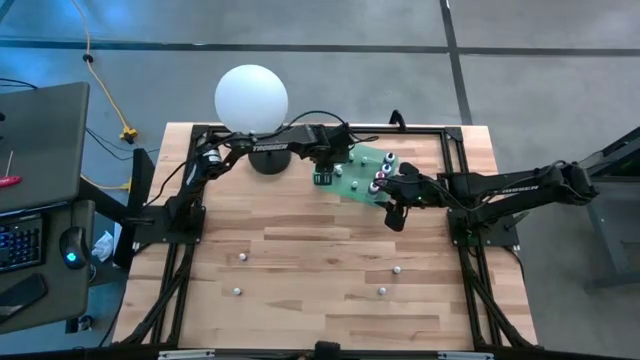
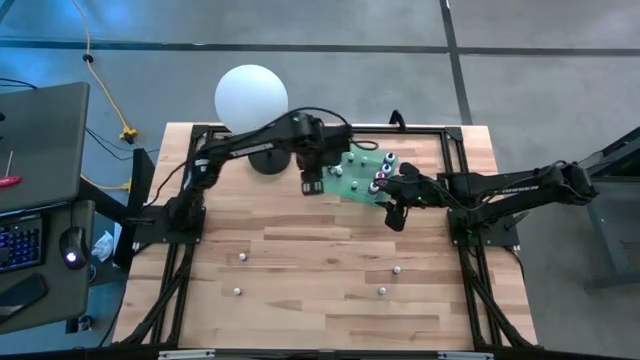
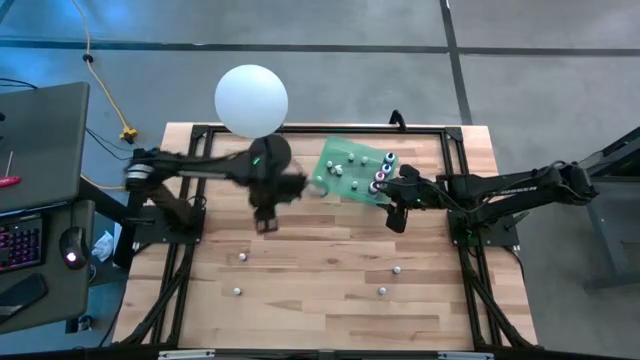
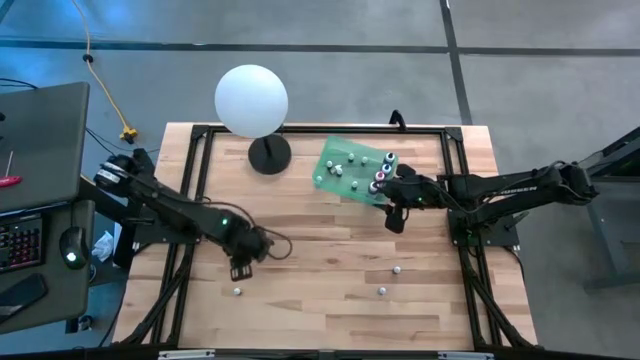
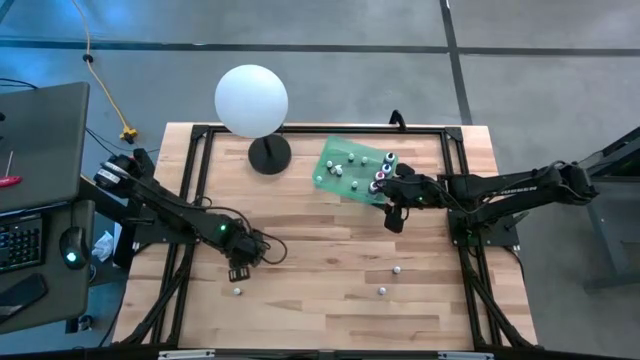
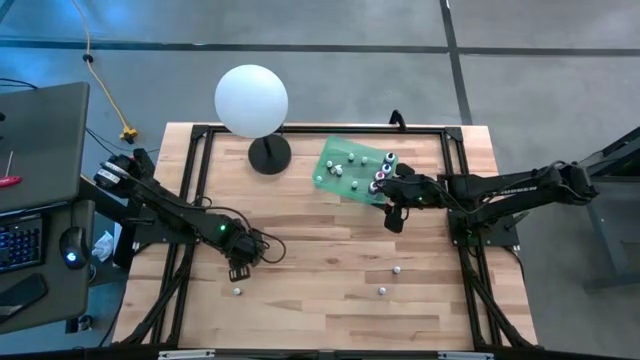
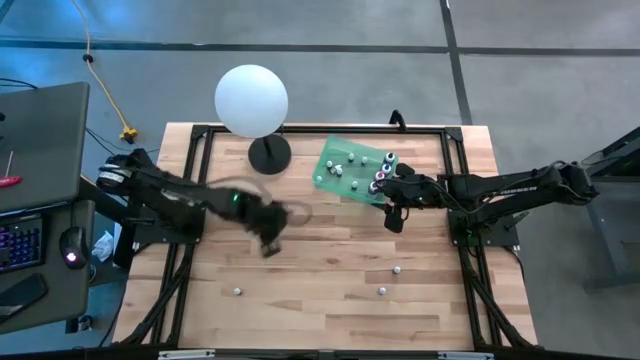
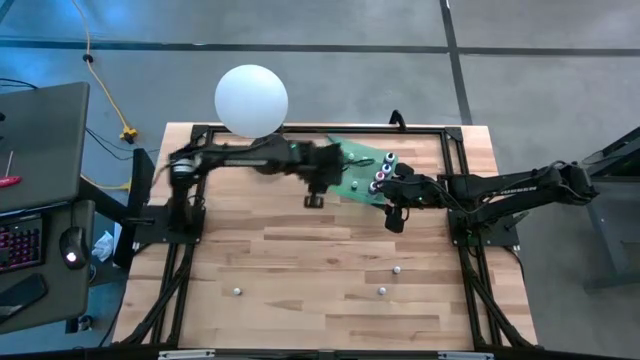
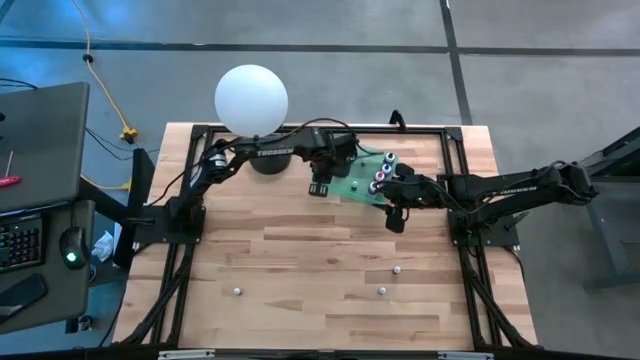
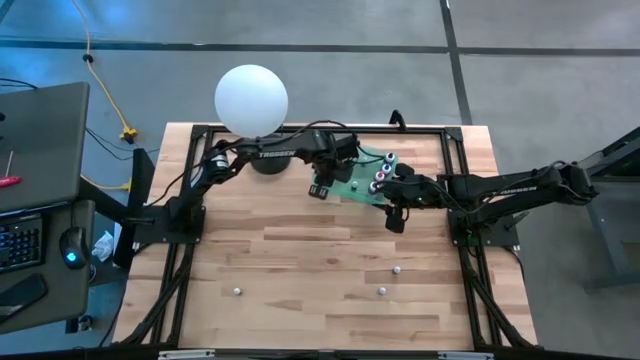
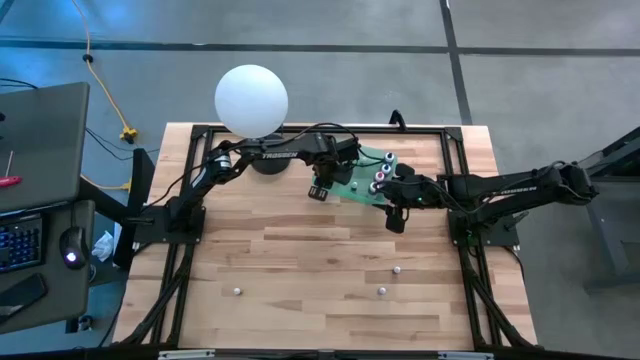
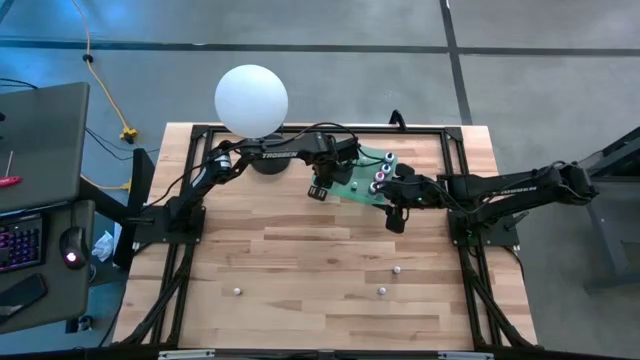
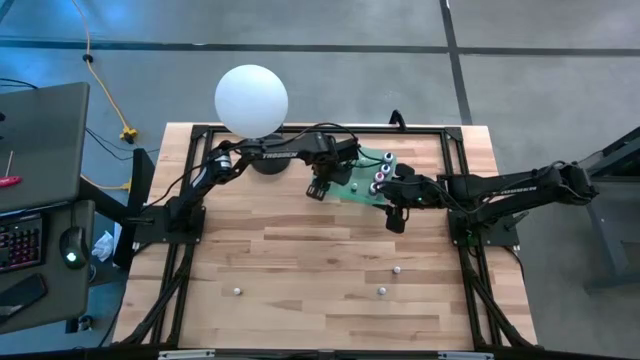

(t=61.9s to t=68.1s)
Task: Pick & Place food coloring
Put the small orange food coloring bottle into the green bin

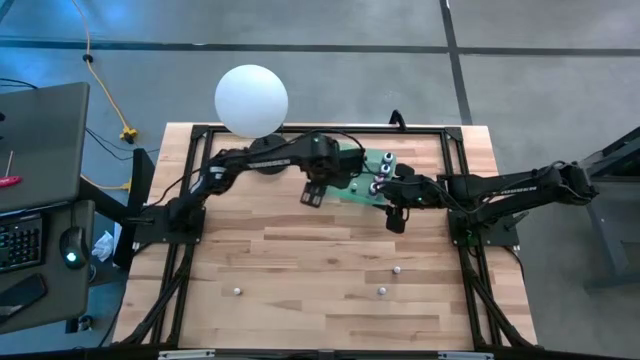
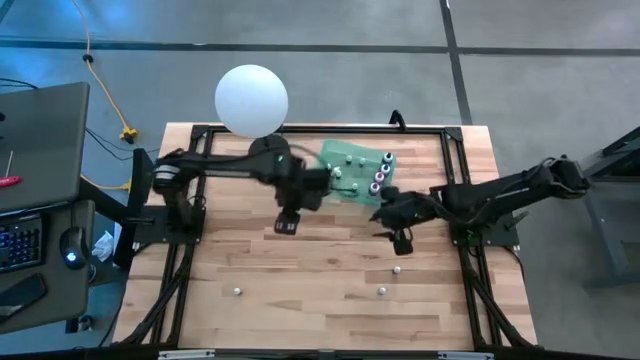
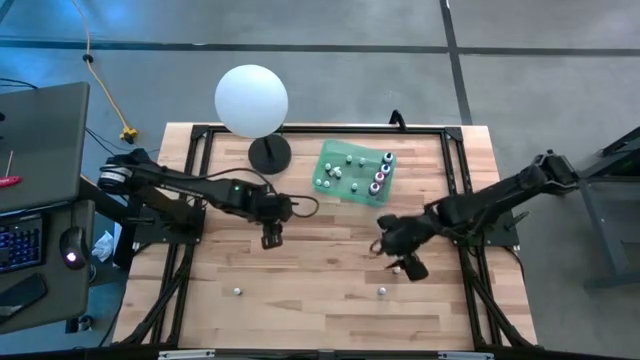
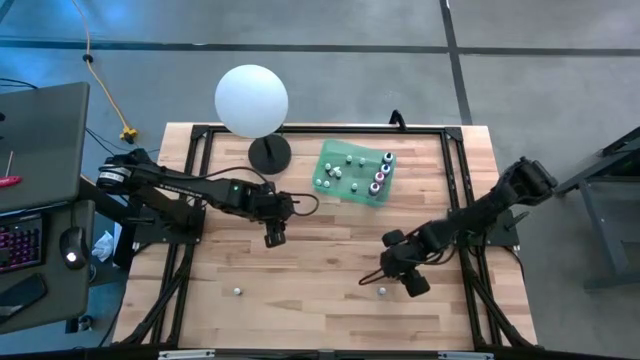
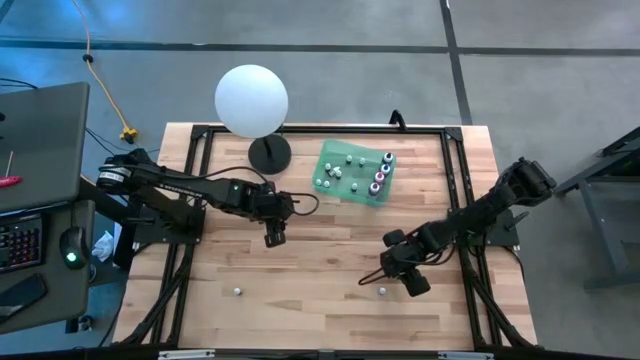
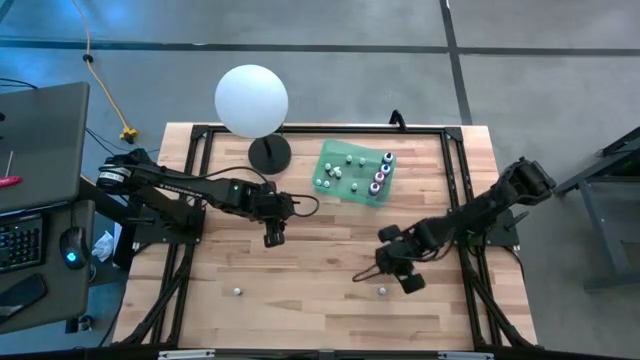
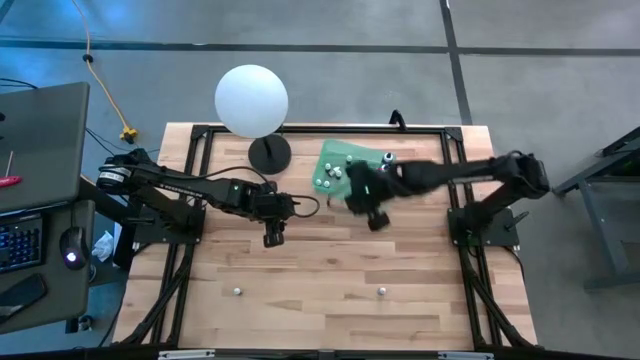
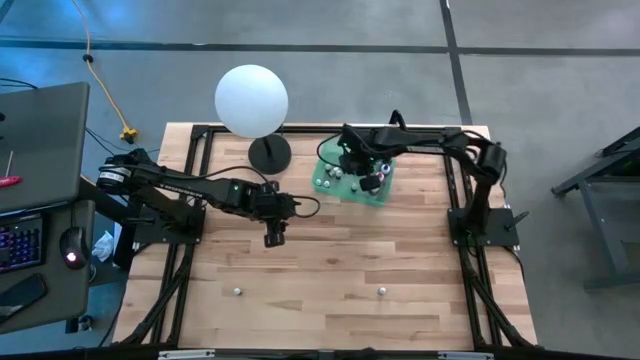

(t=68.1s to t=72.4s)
Put the small black food coloring bottle into the green bin

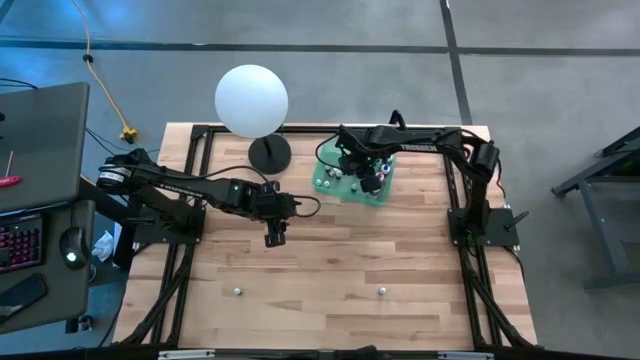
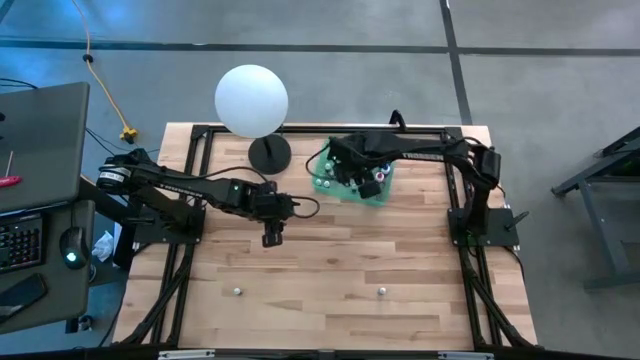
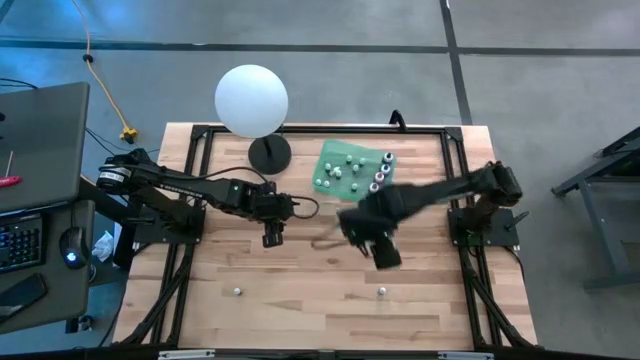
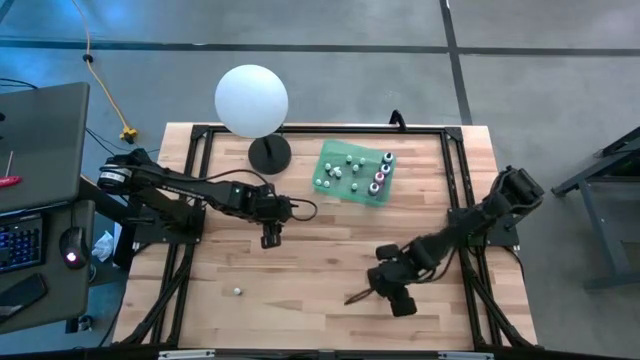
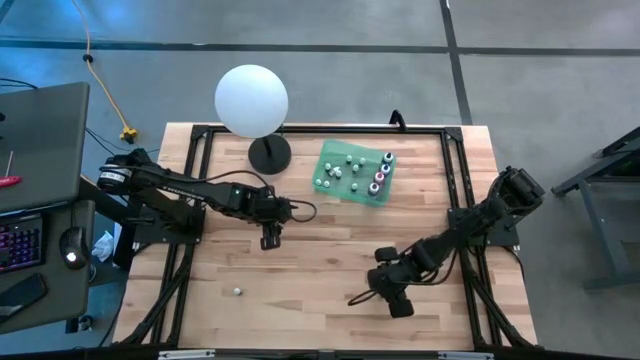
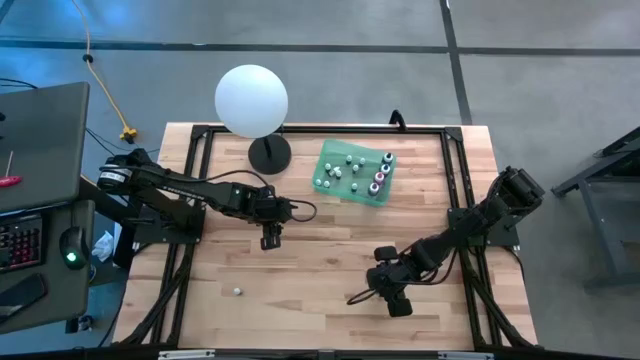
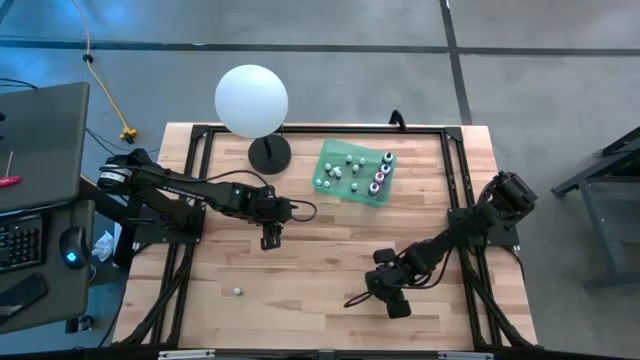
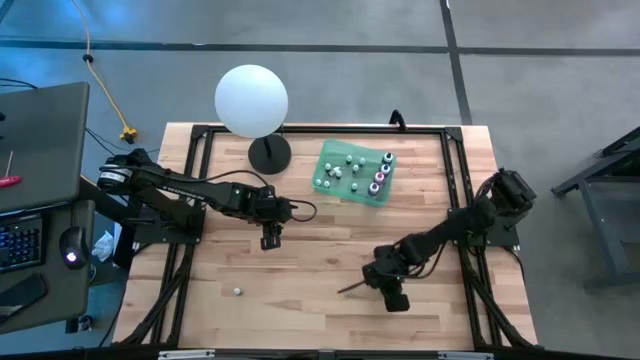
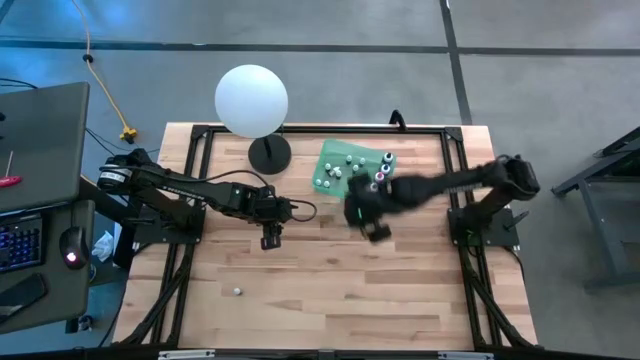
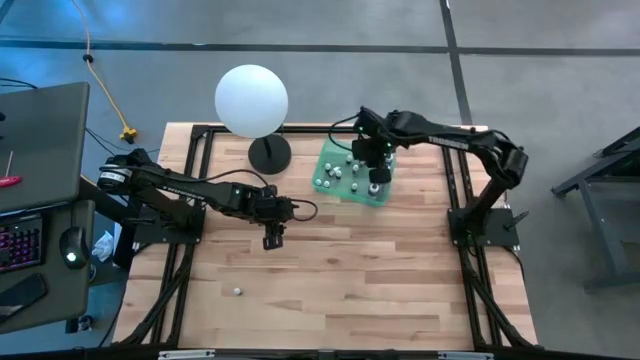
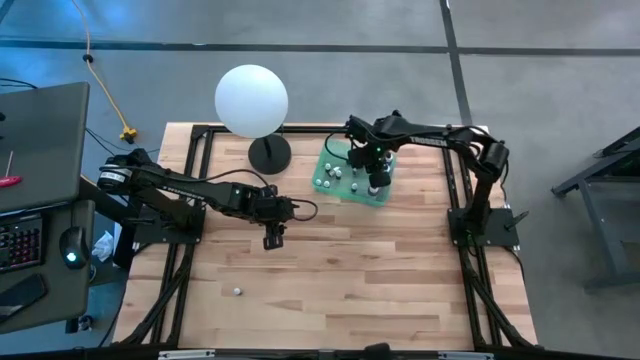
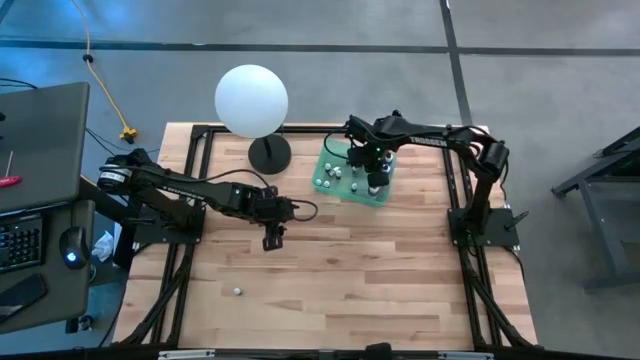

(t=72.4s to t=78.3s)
Put the small green food coloring bottle into the green bin

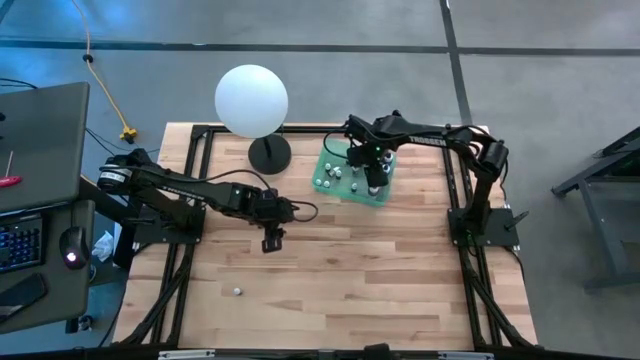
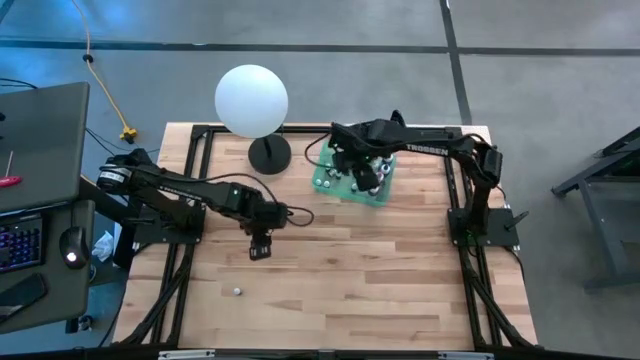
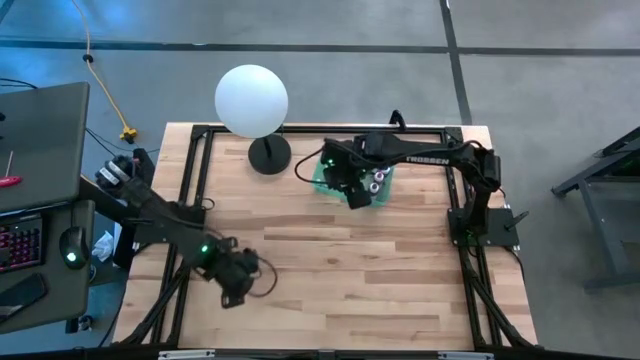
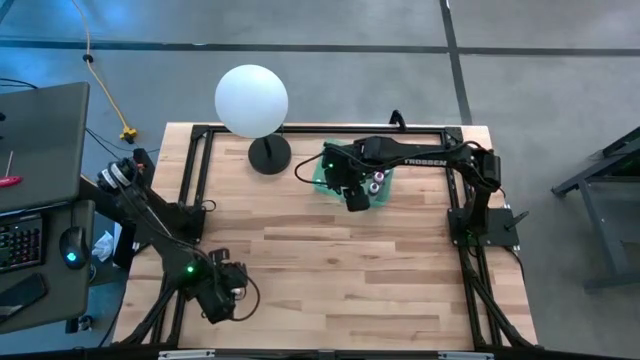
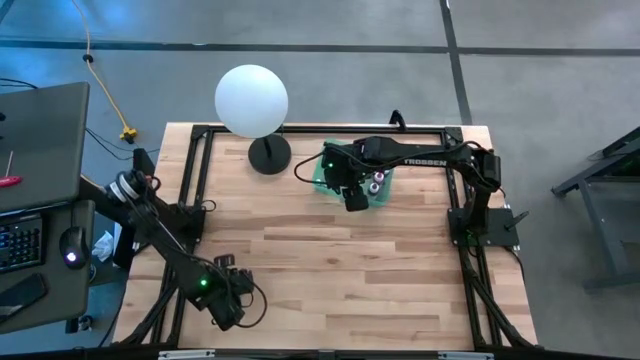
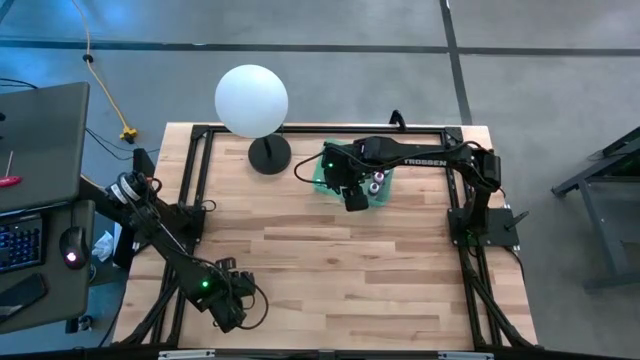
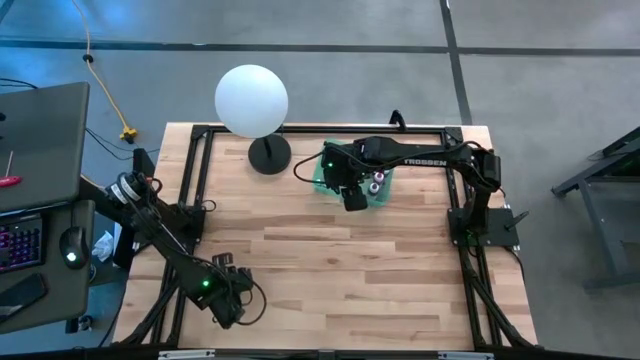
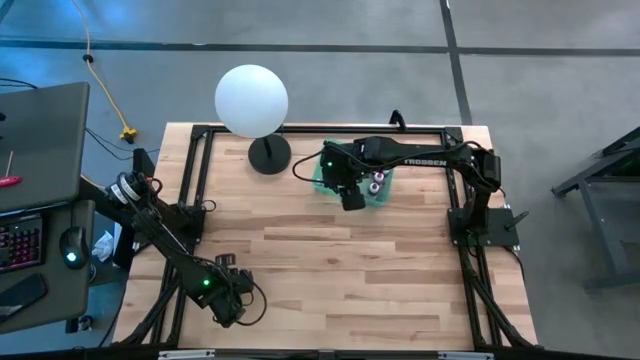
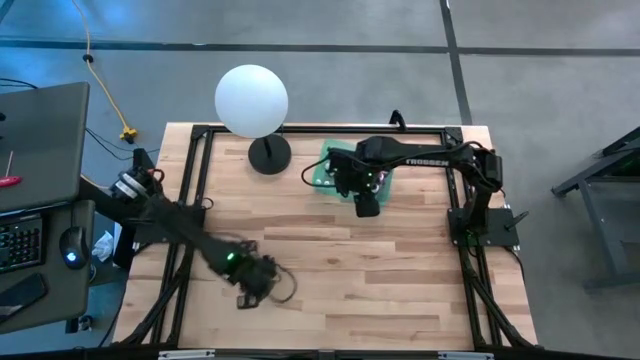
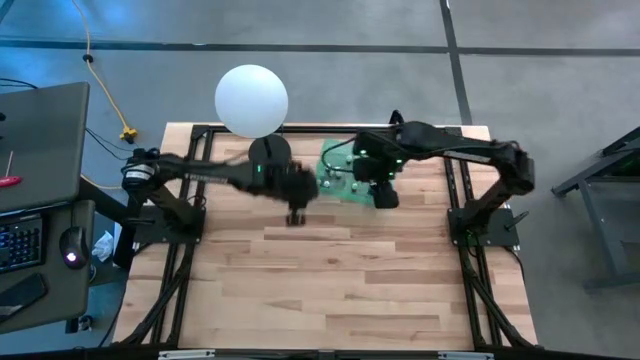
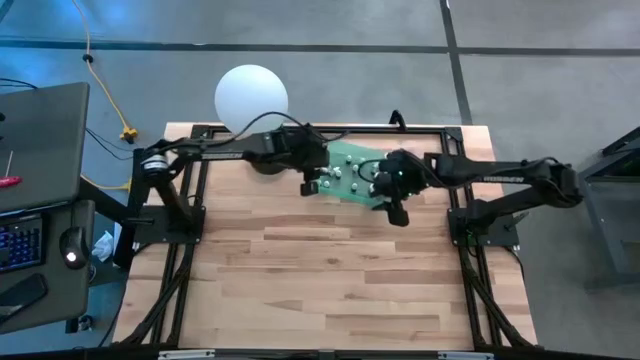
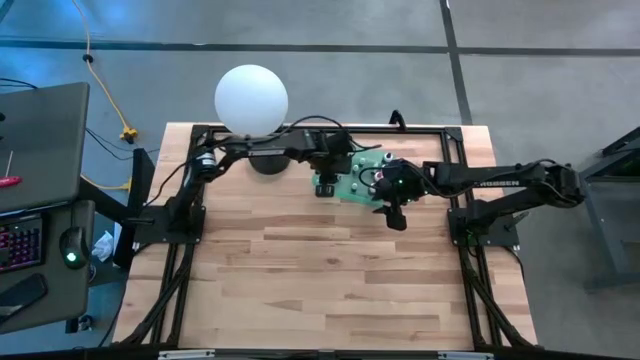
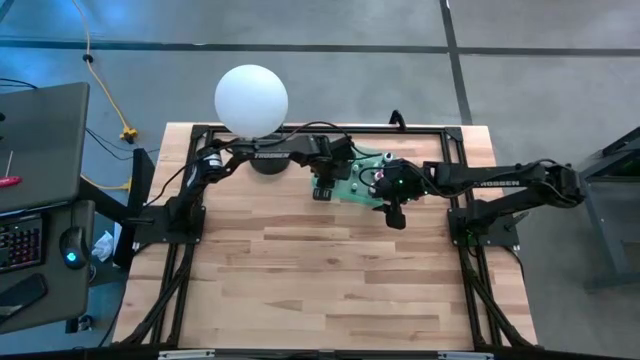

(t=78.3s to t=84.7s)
Put the small black food coloring bottle into the green bin
